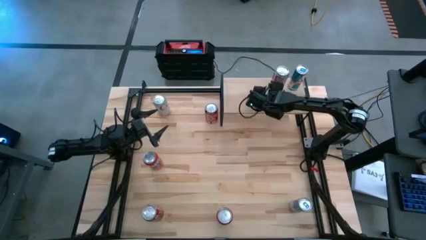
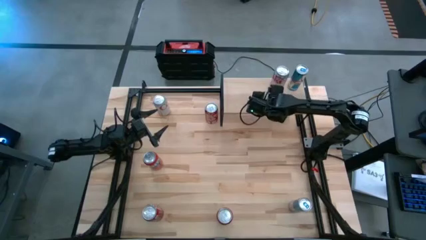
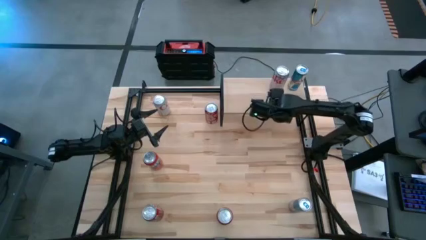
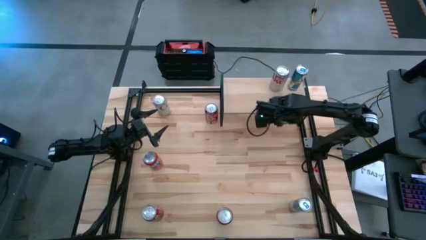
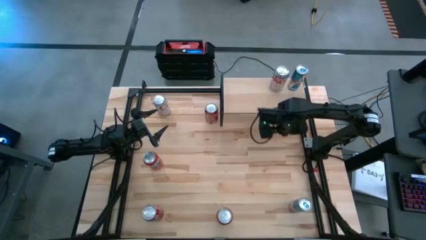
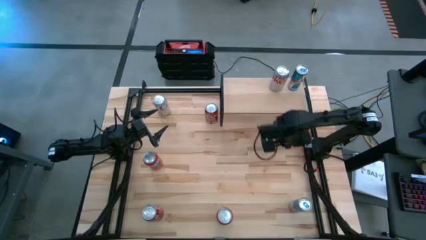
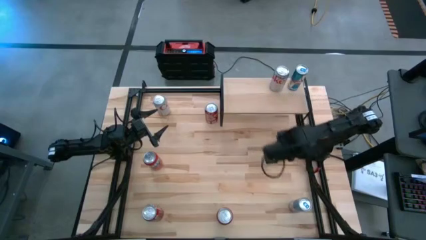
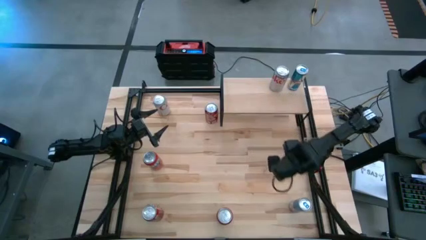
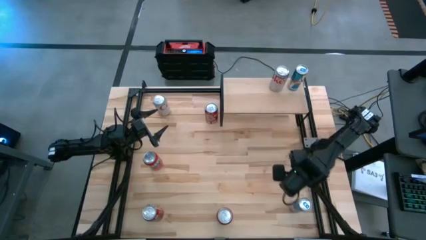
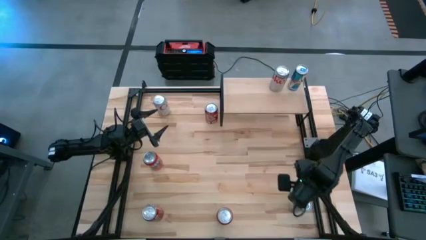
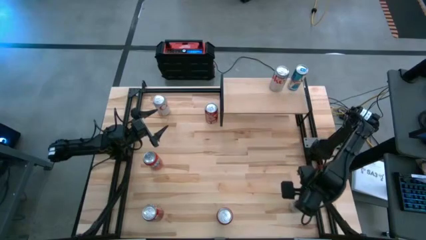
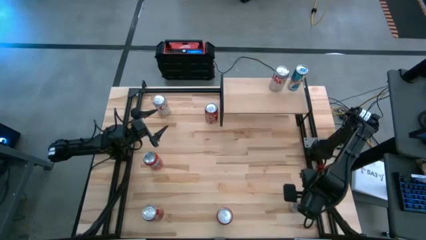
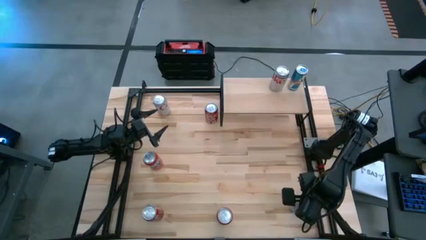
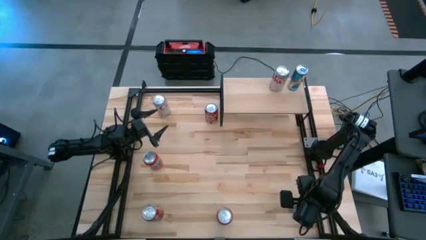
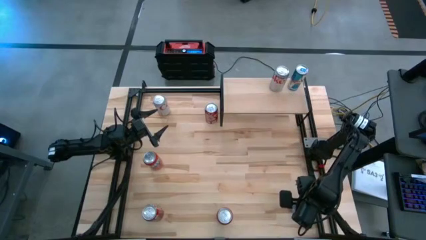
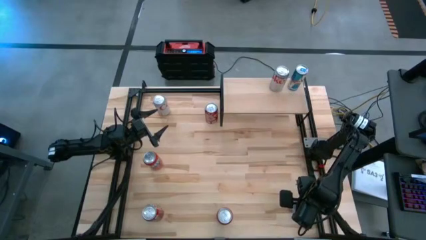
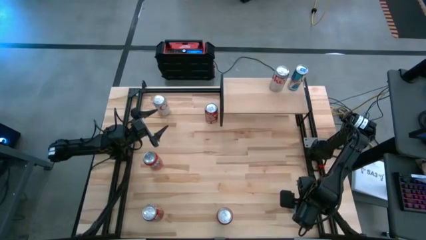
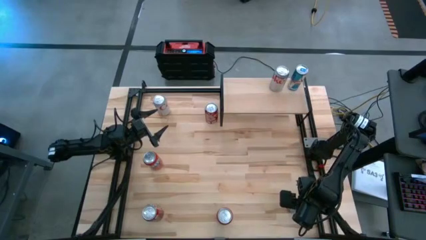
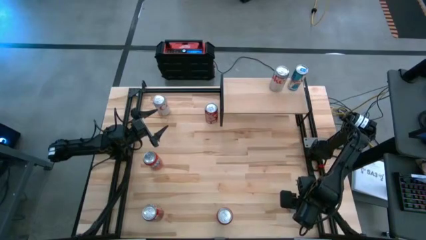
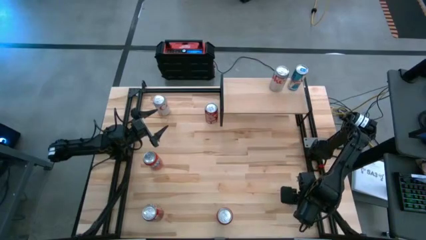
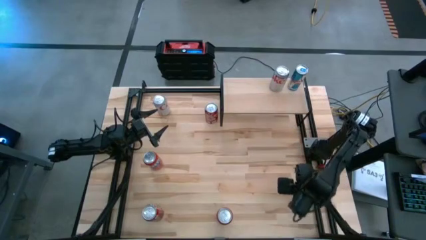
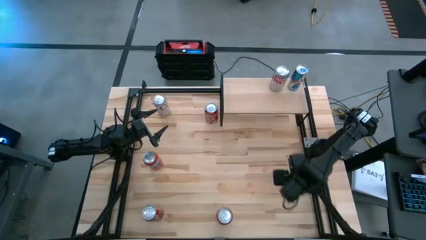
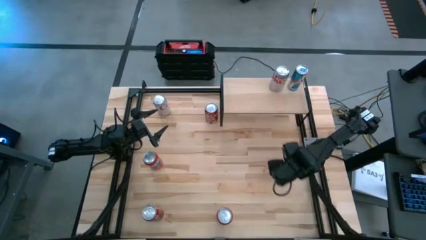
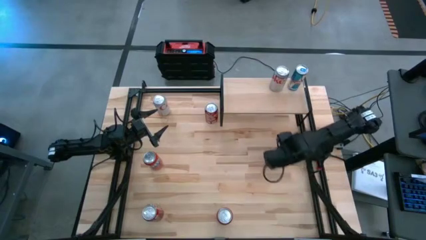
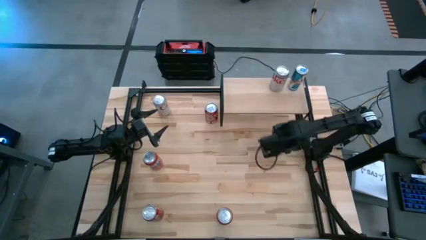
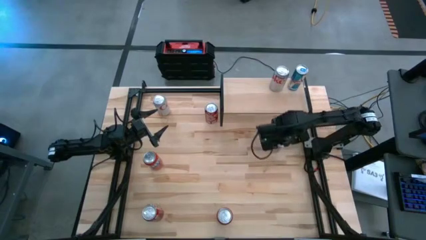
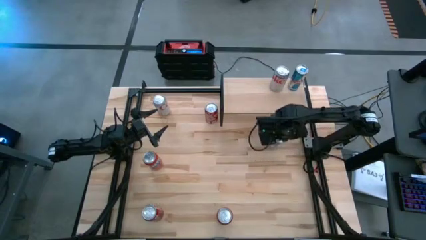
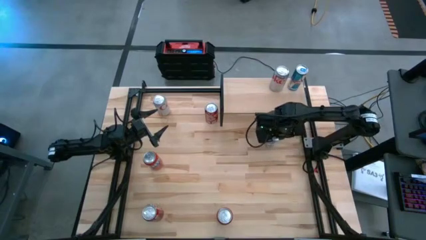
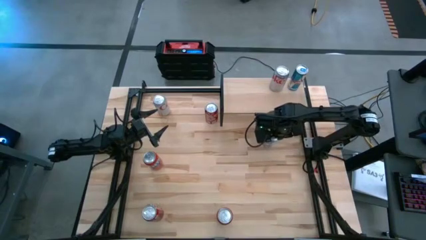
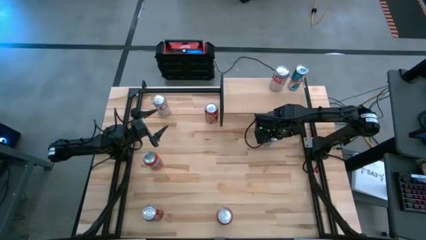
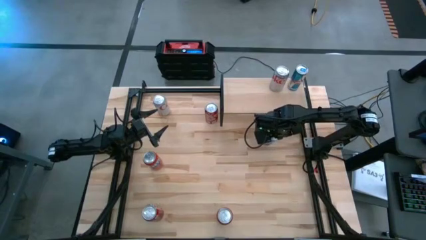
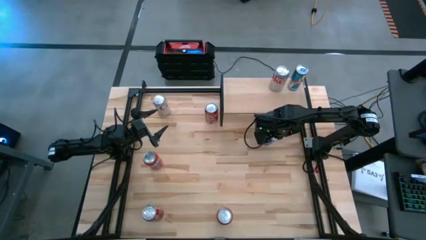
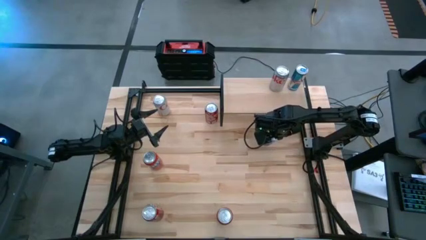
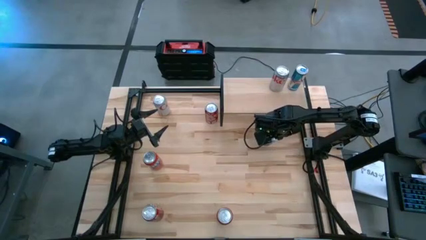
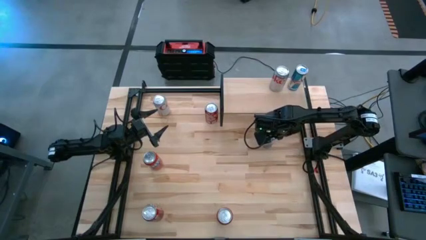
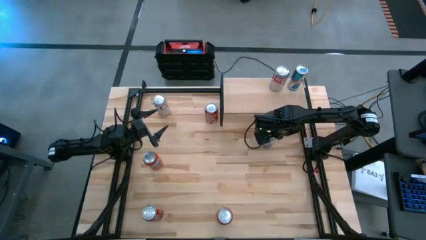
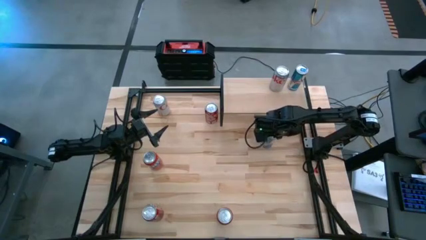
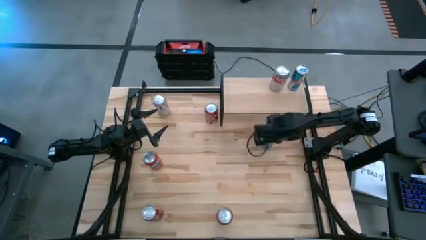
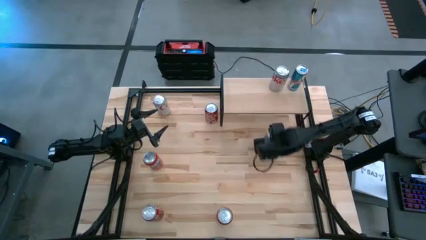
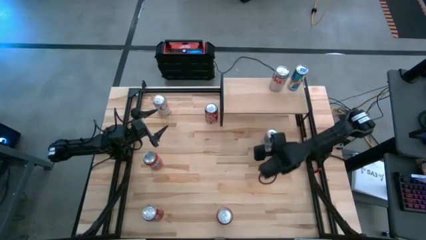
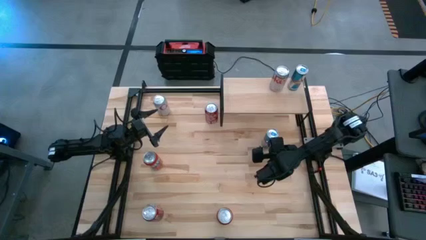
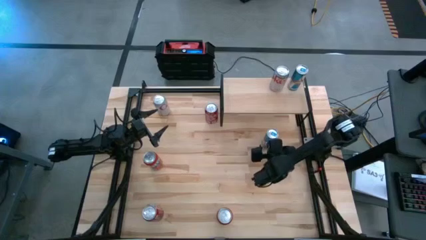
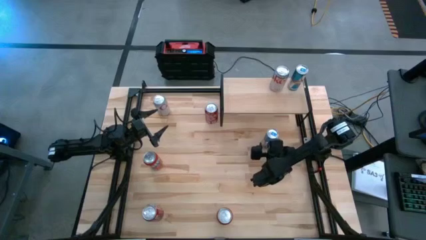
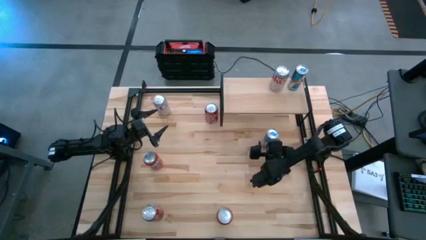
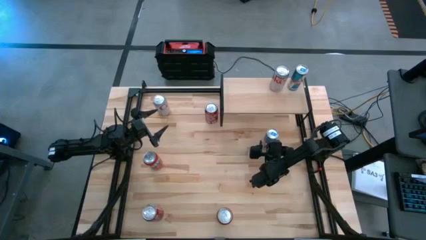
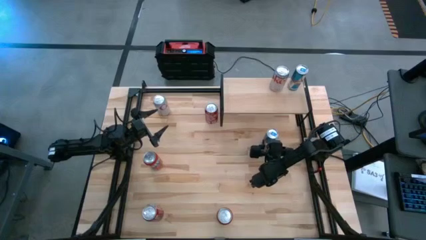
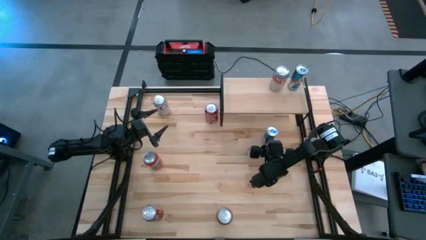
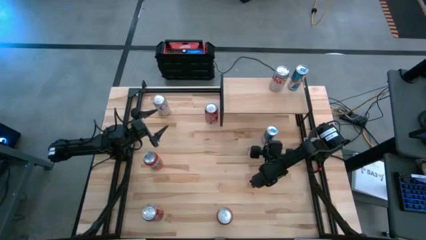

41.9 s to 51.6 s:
Task: Place canned beverage on shelf
Put the blue soda can on the shelf aligned with the other blue soda can

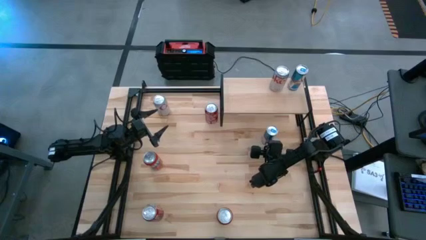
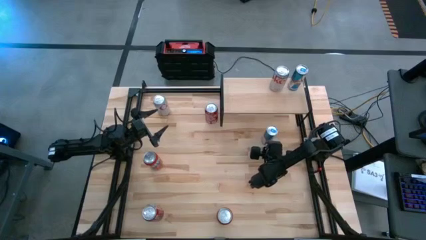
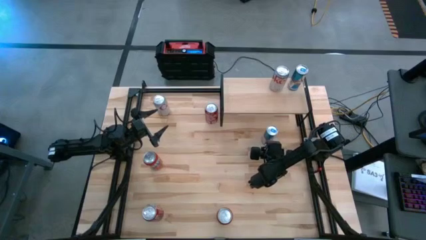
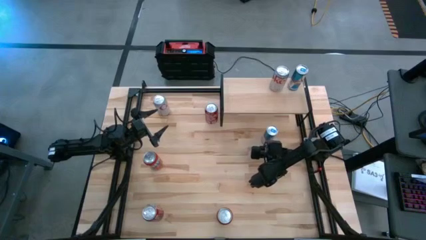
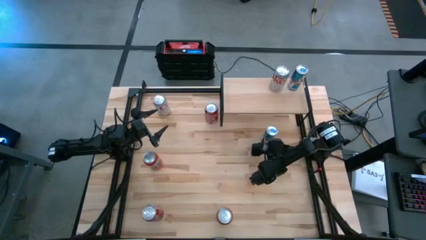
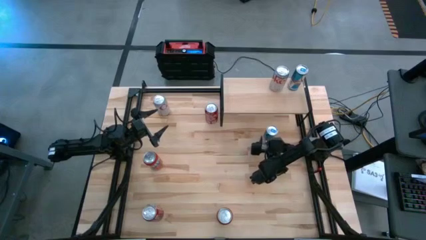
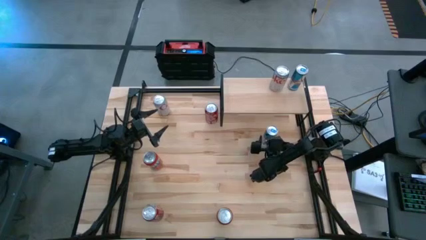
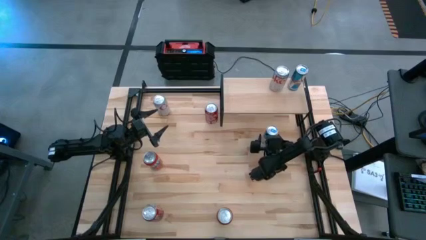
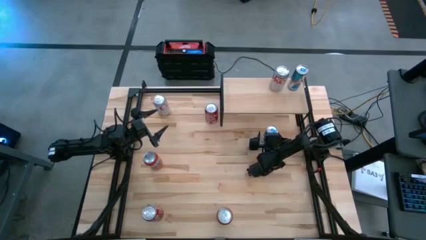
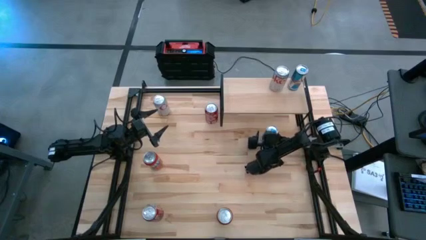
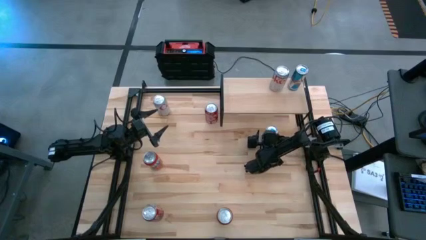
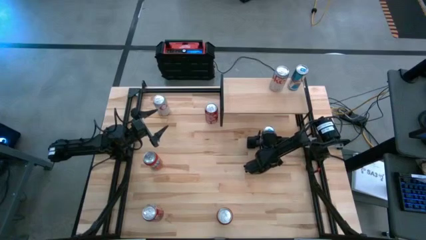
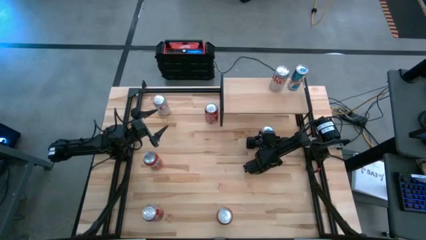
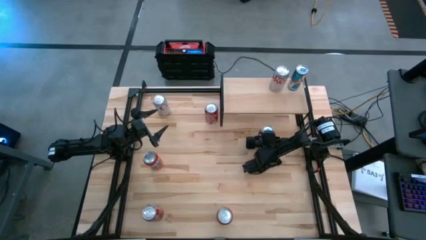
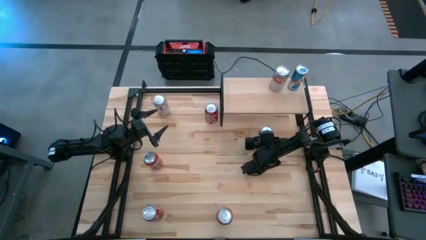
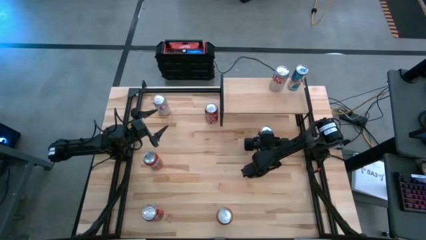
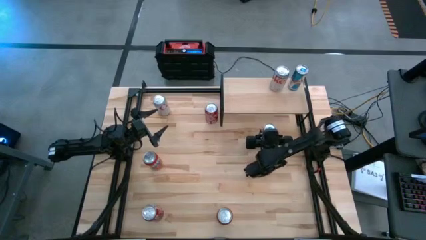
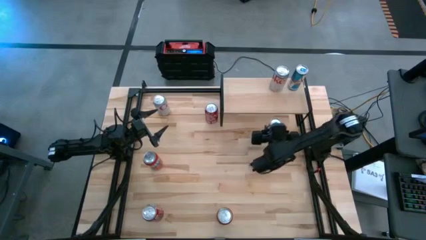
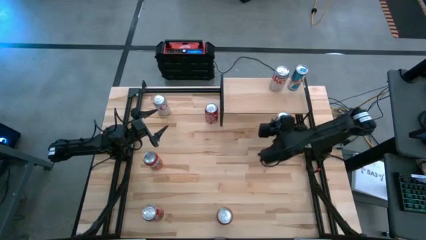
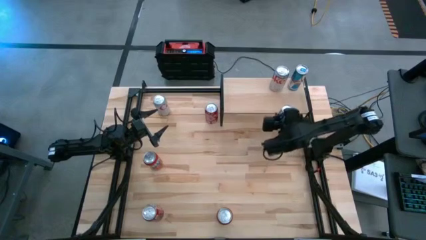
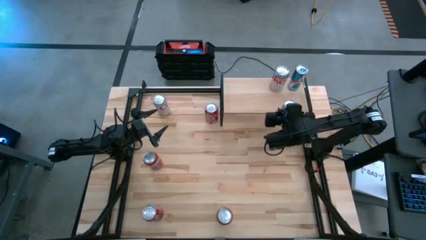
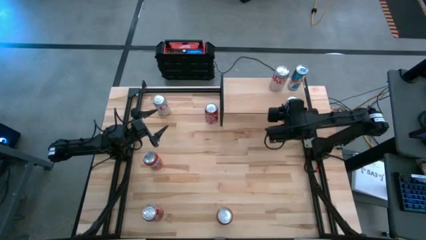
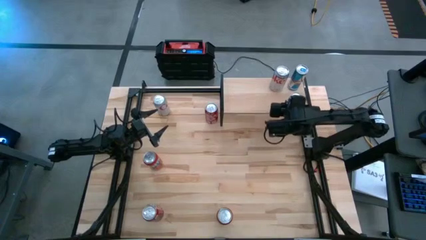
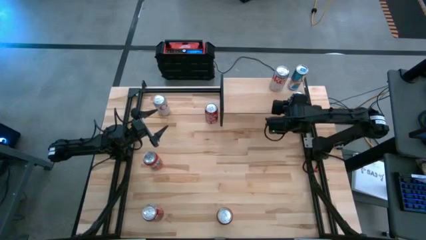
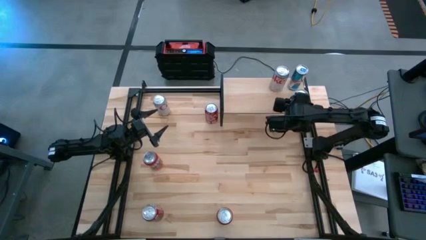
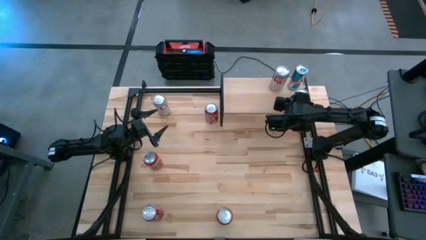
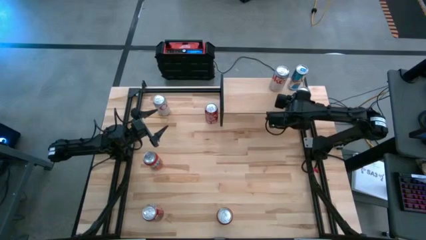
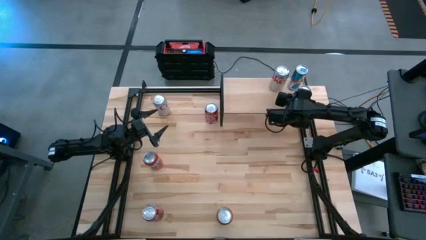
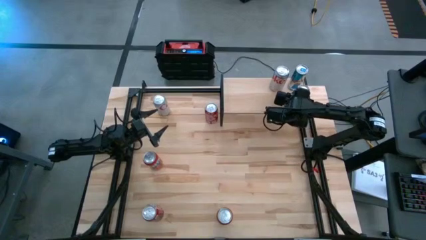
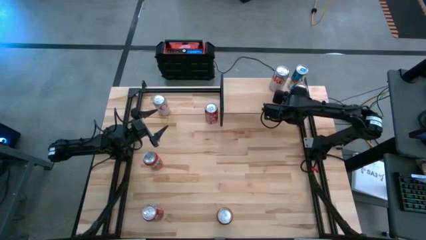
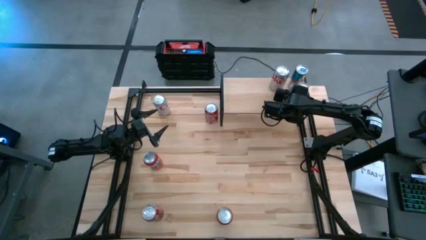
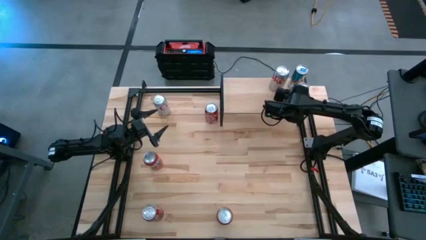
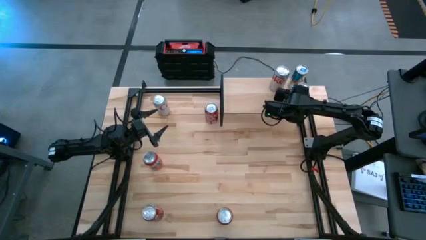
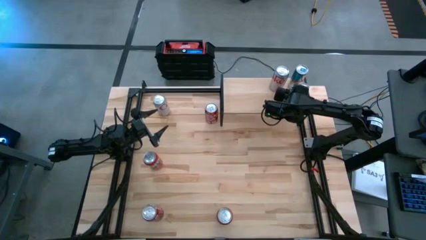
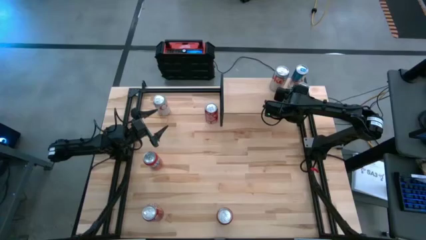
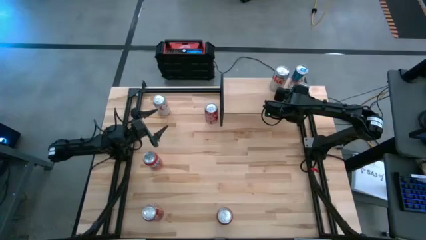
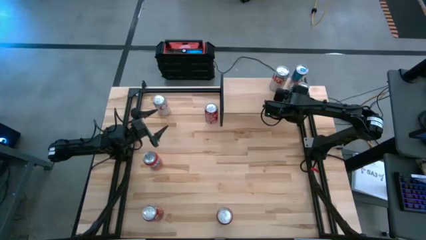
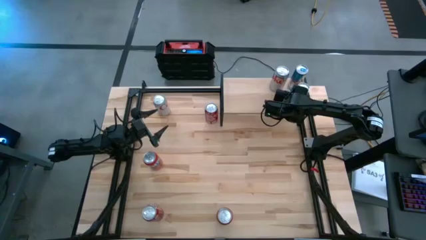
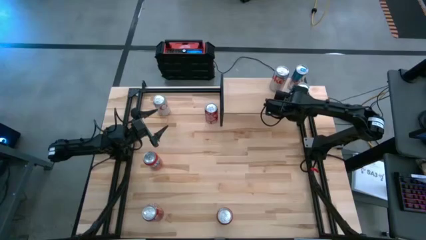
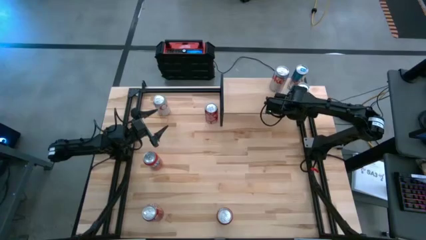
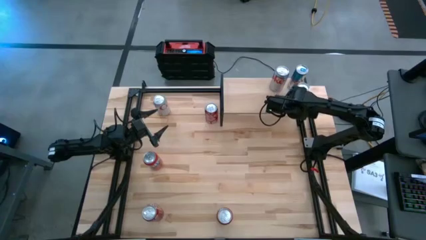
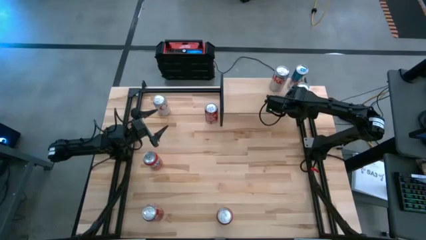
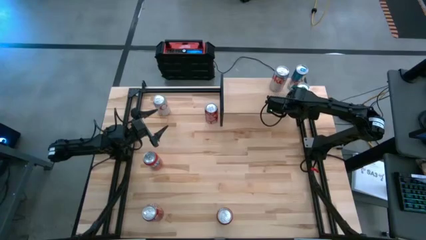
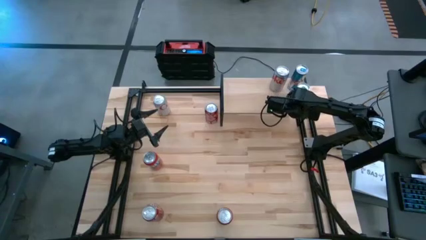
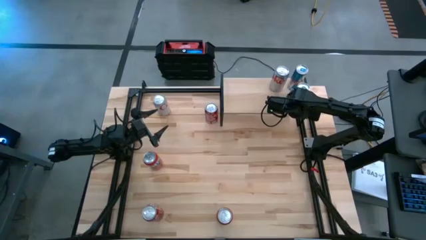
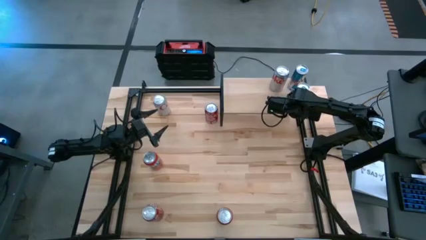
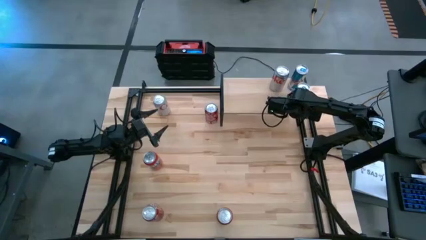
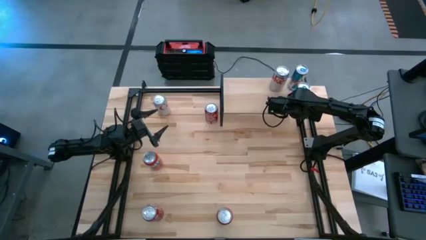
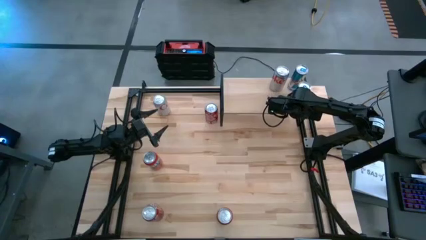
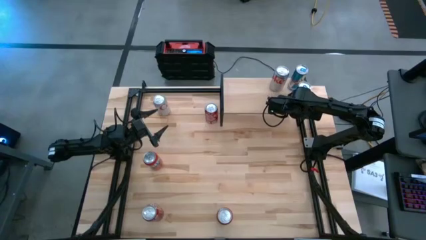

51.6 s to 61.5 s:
Put the blue soda can on the shelf aligned with the other blue soda can
